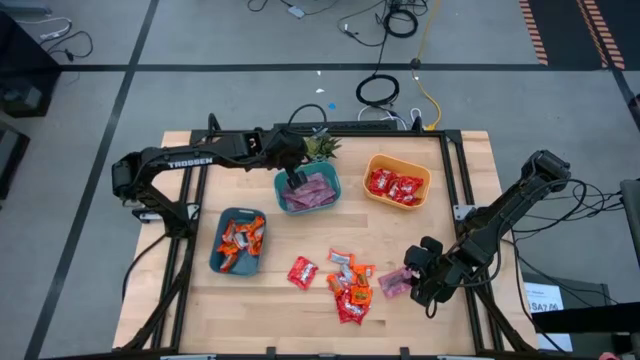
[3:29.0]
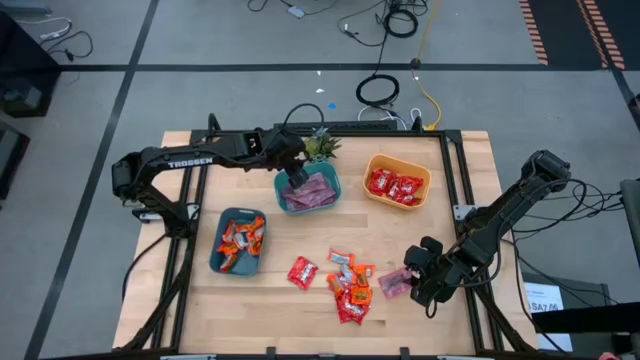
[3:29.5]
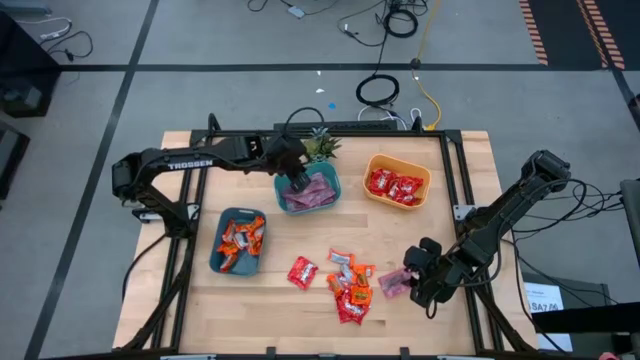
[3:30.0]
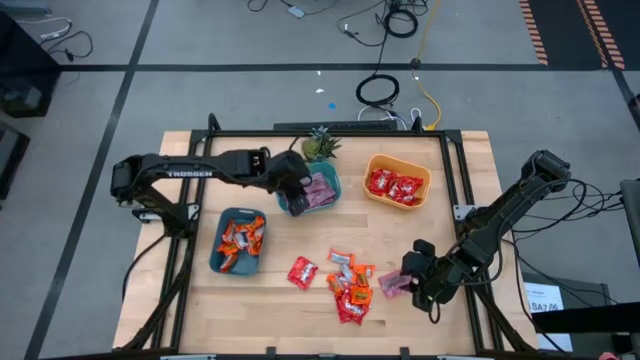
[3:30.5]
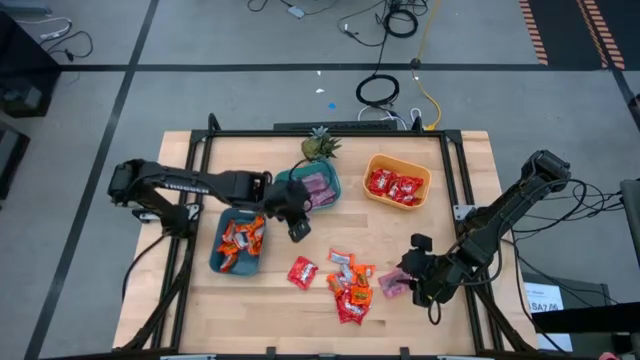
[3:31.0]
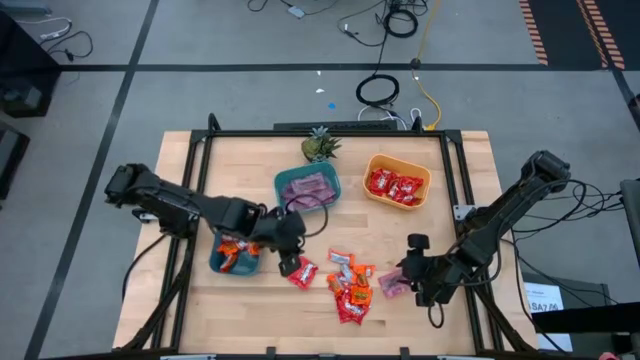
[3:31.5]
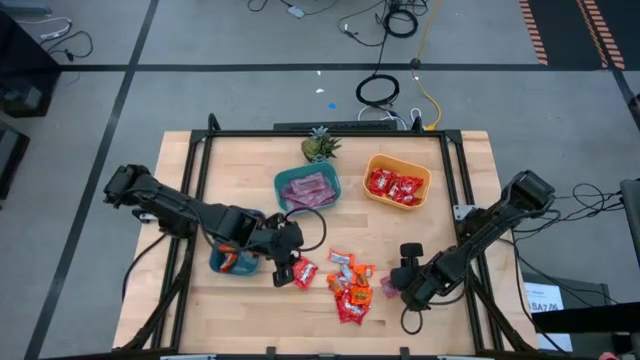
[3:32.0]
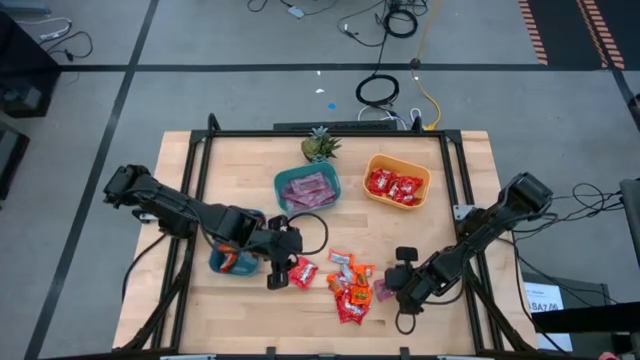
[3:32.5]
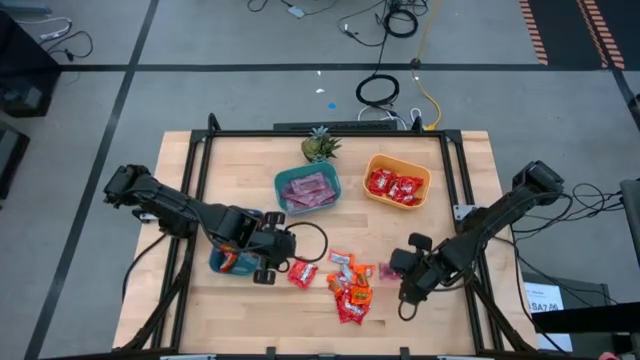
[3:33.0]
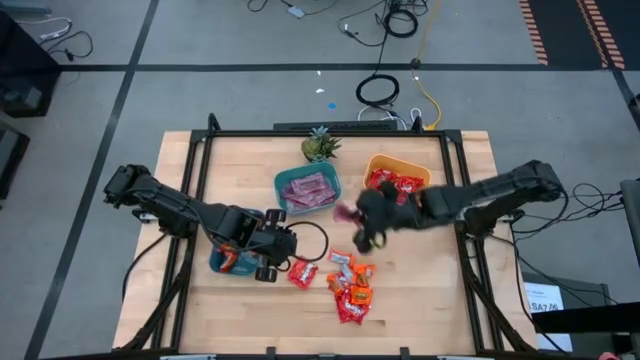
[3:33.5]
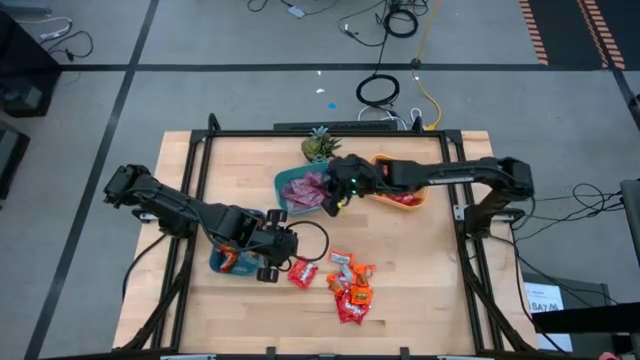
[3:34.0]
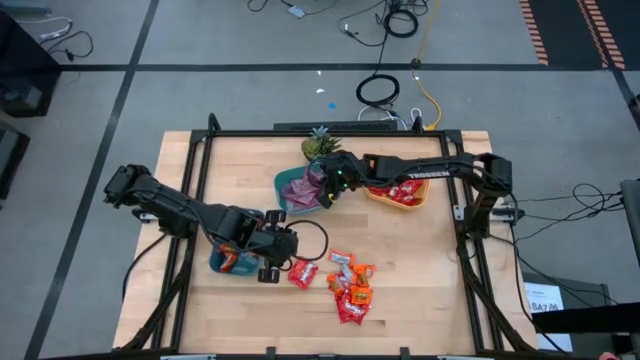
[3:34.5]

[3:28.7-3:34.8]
Task: Sort candy
Put the pink candy into the light blue bin

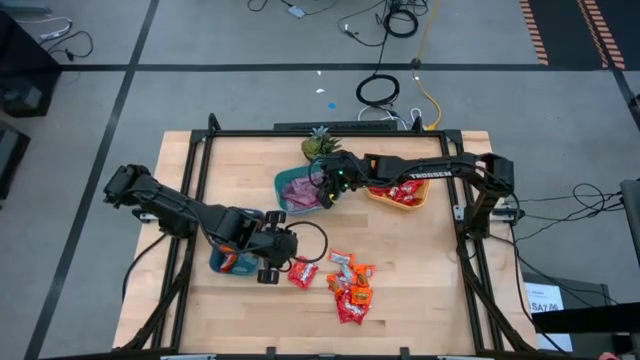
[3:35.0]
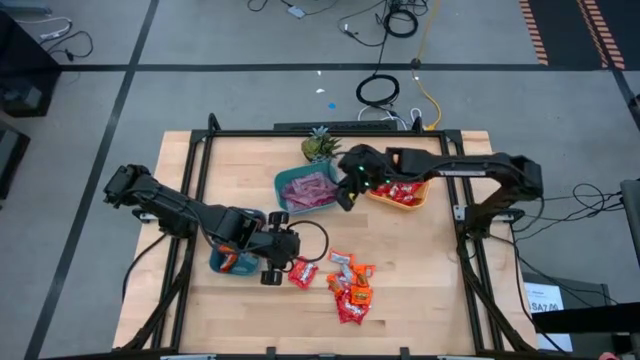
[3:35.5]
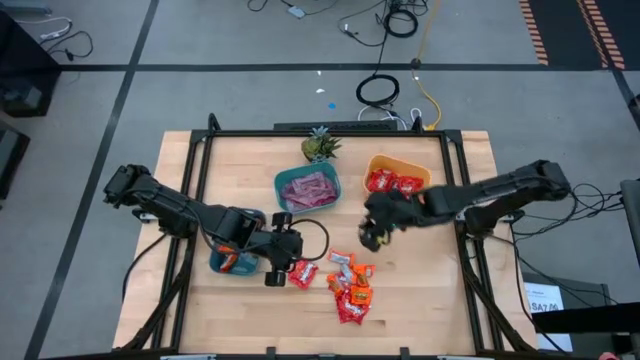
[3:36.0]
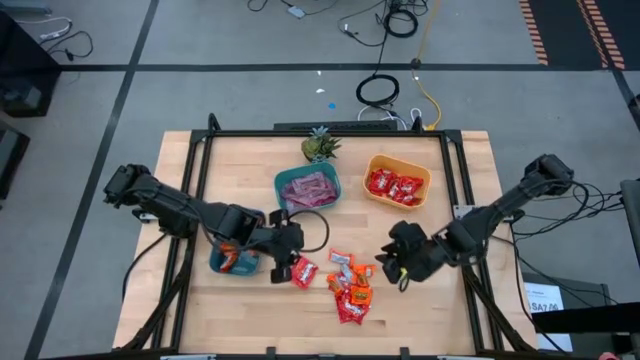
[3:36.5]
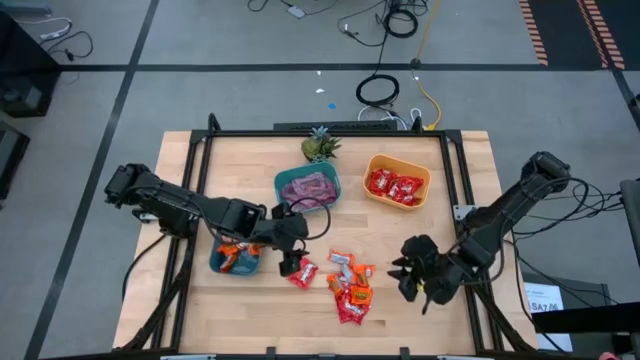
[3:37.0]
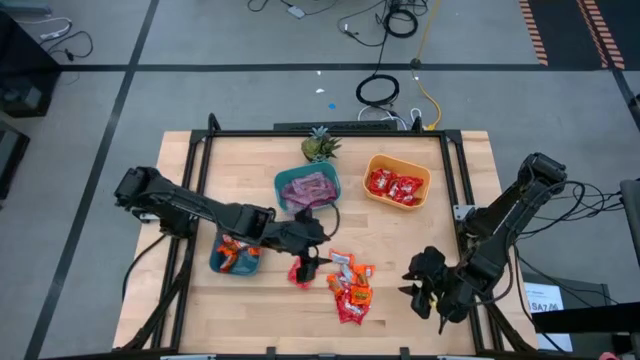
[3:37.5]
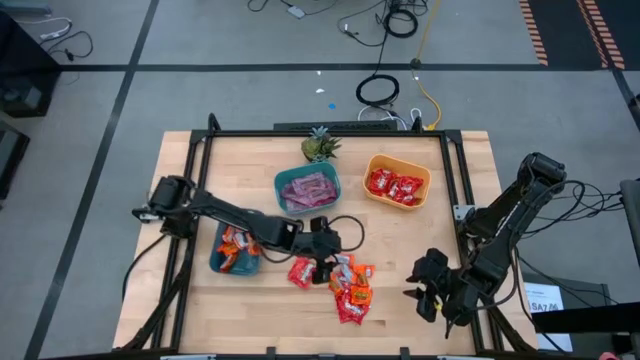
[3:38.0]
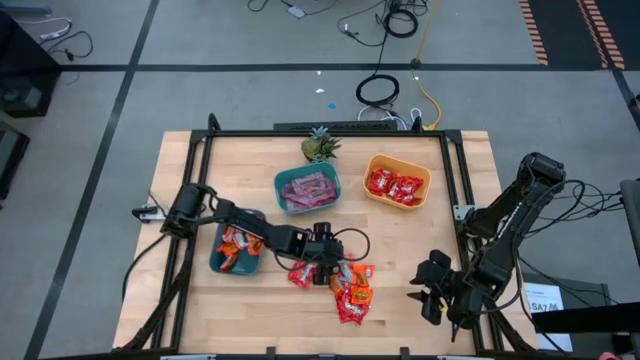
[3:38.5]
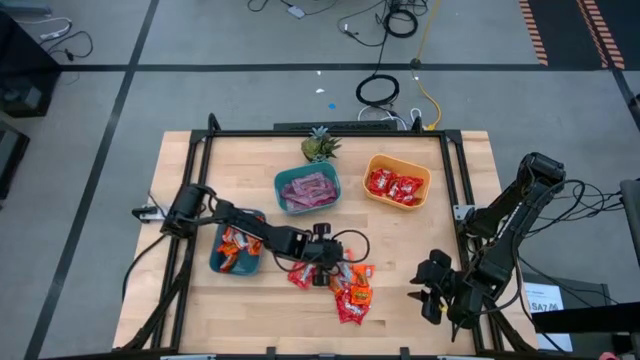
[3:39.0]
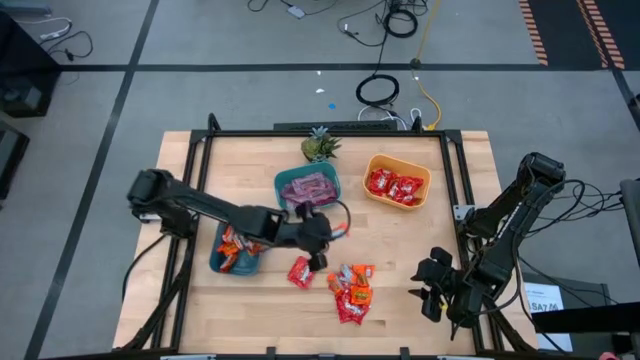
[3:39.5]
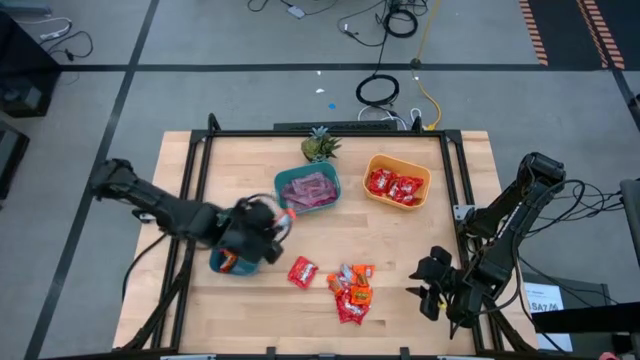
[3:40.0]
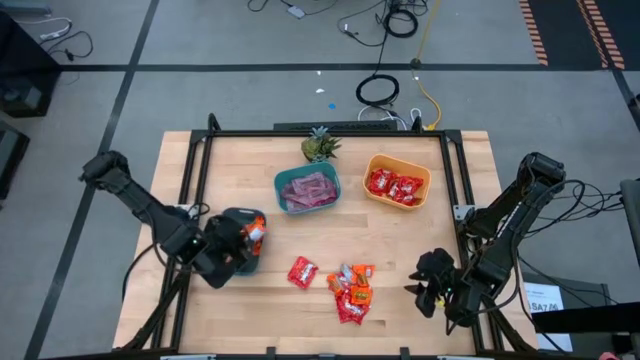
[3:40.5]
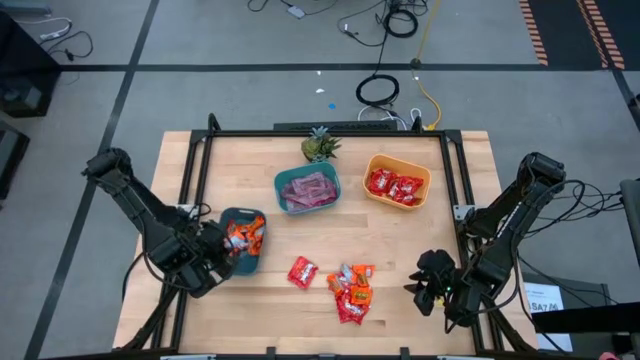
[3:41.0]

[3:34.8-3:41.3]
Put the orange chocolate into the blue bin

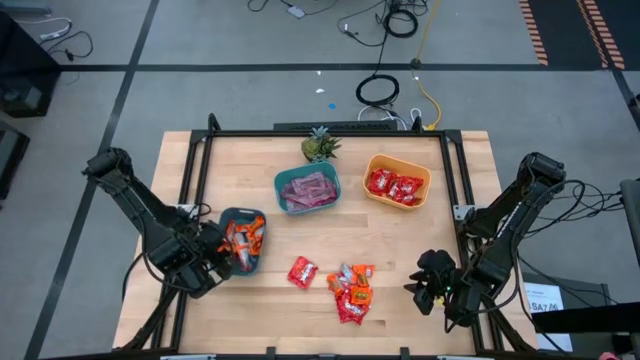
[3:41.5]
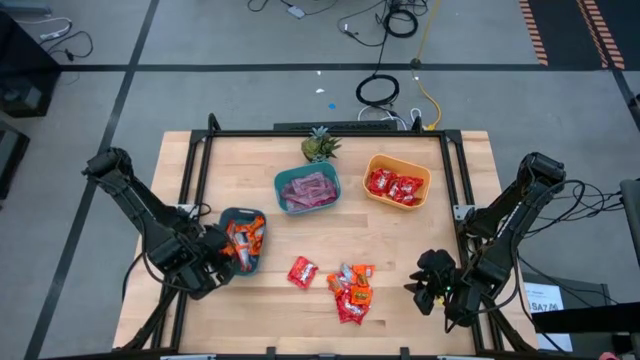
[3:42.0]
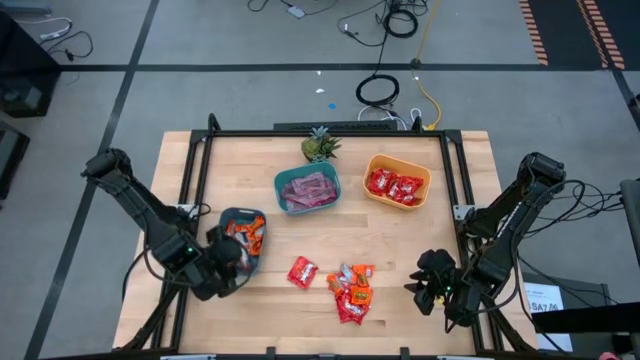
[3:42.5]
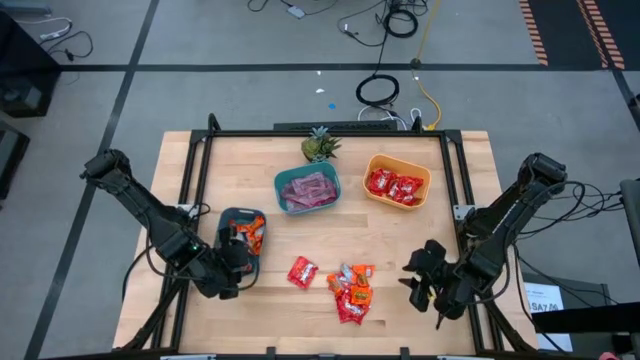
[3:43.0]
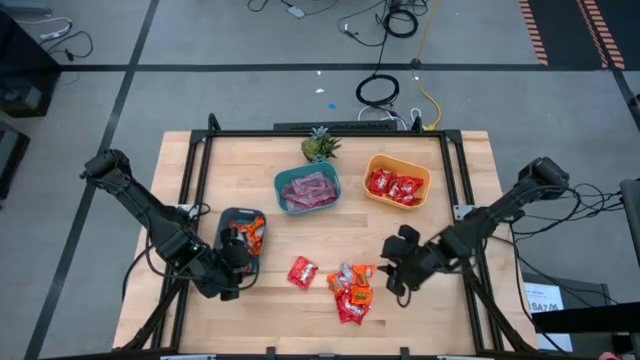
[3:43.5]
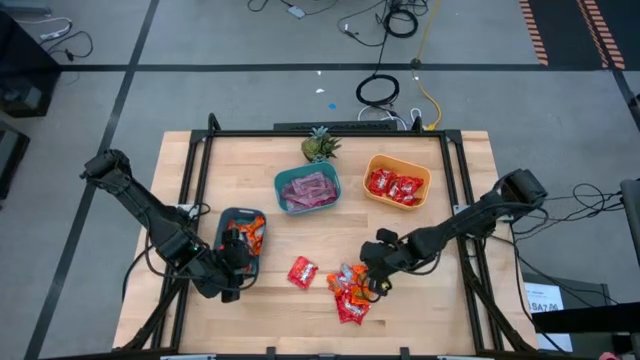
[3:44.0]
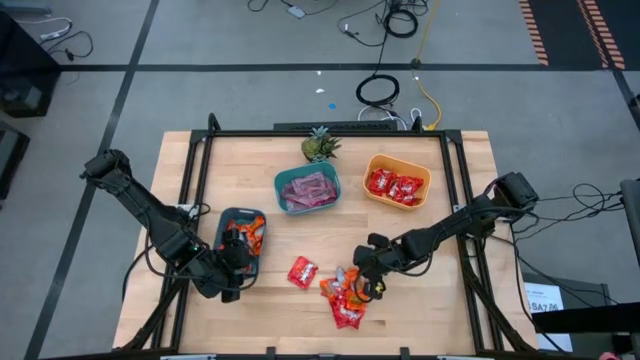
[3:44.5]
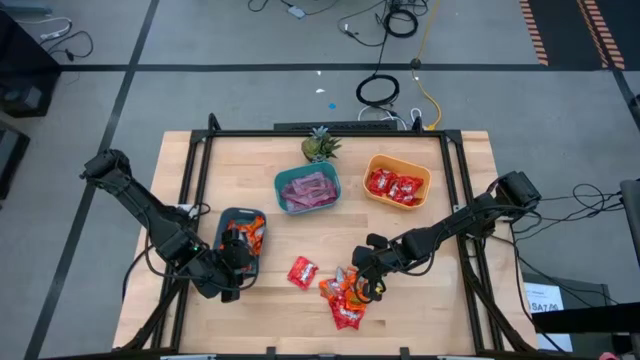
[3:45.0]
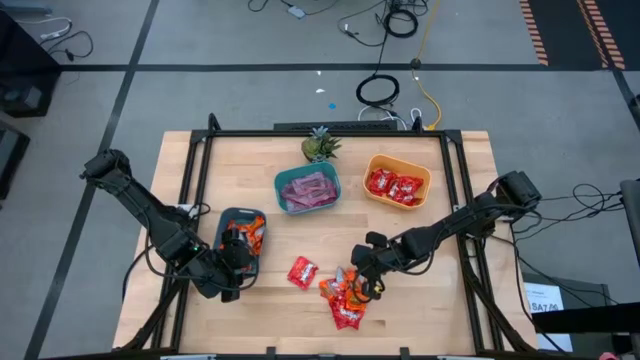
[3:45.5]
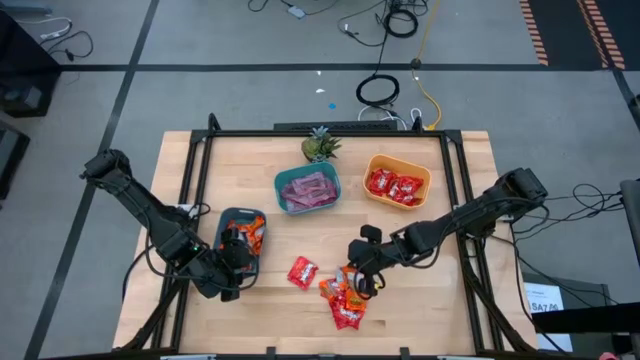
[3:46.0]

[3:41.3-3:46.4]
Put the orange chocolate into the blue bin

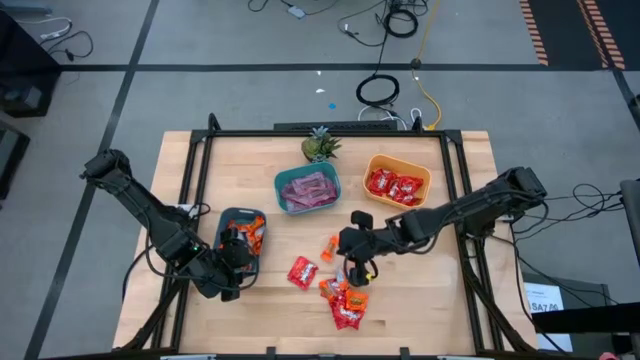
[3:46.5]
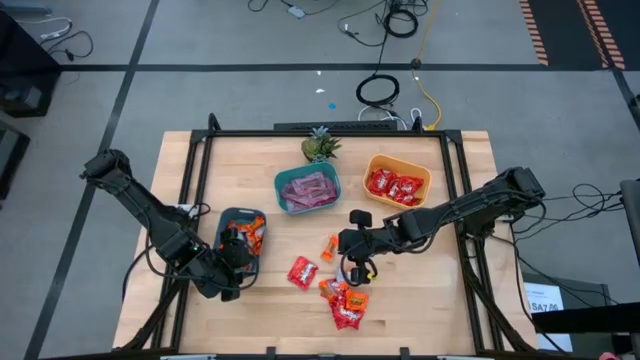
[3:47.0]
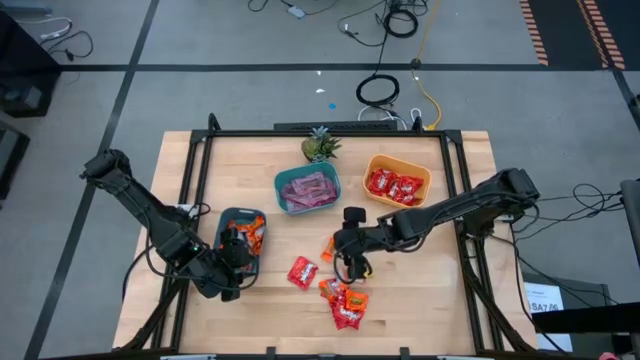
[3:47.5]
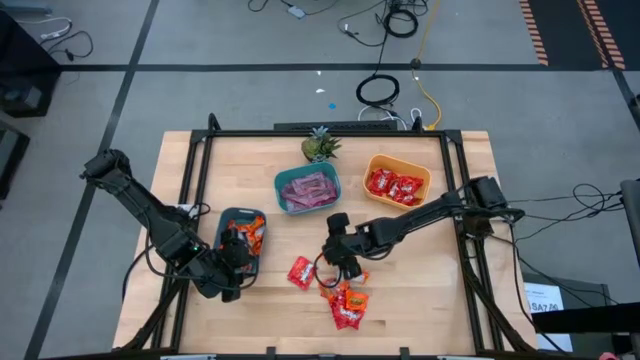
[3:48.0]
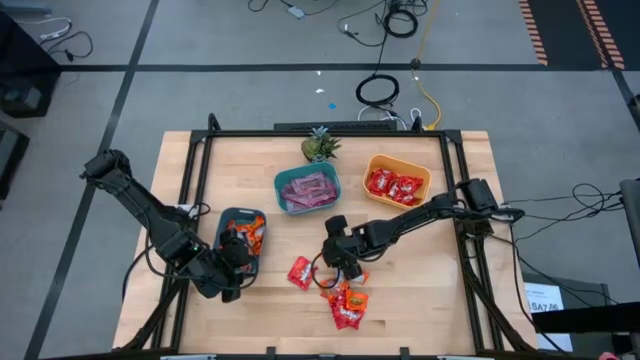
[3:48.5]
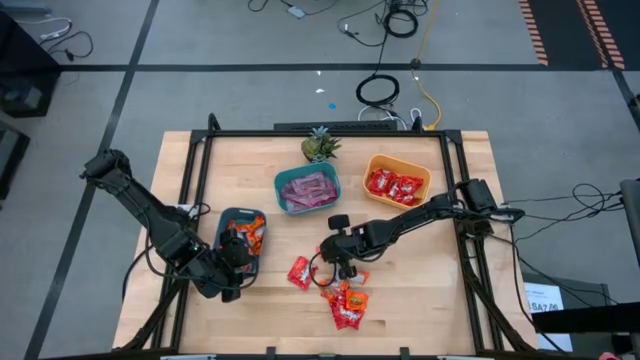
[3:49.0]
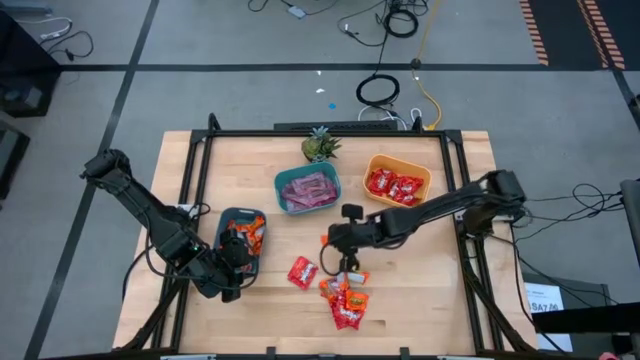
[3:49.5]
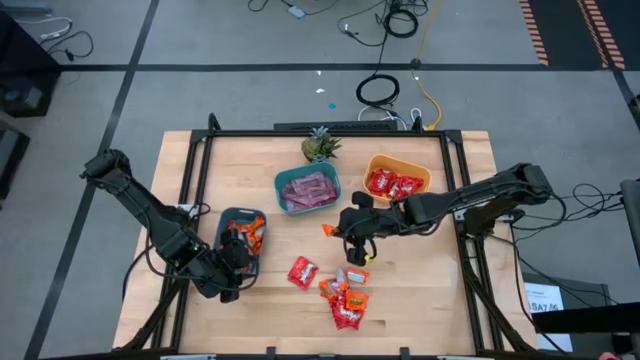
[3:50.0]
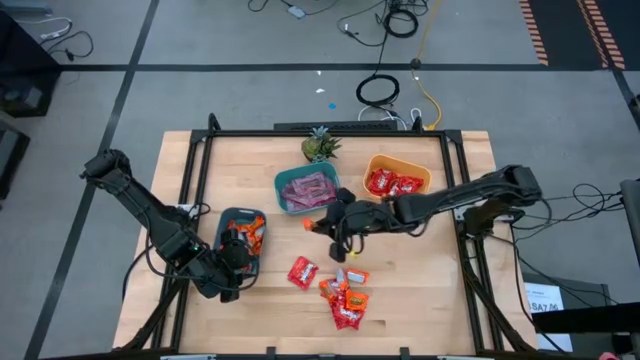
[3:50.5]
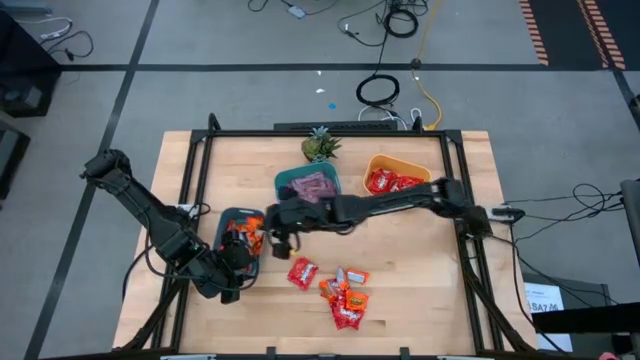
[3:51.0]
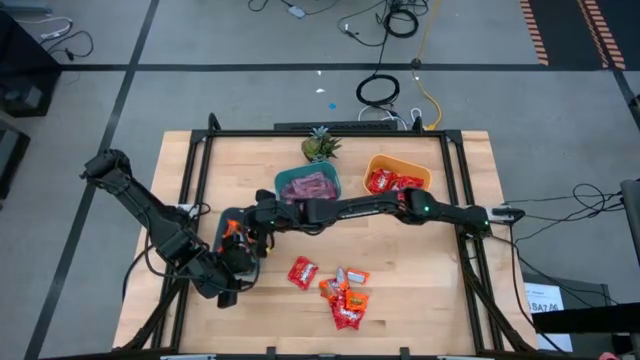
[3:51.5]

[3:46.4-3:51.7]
Put the orange chocolate into the blue bin
